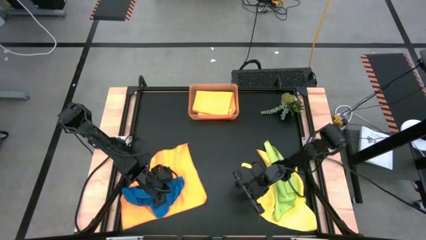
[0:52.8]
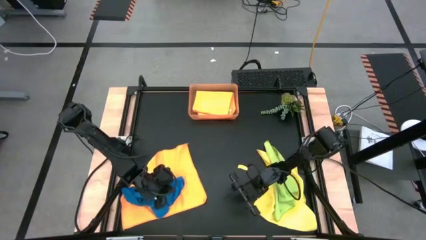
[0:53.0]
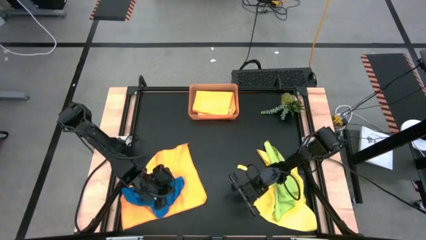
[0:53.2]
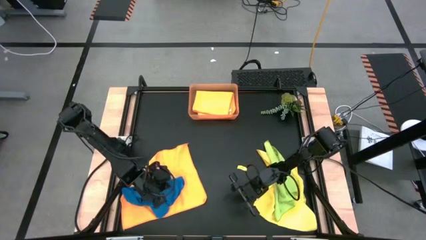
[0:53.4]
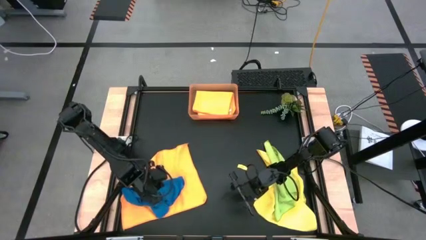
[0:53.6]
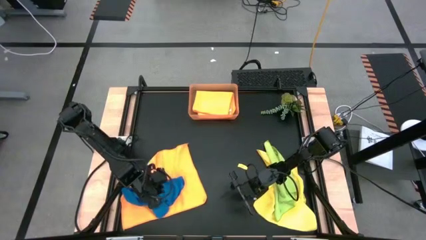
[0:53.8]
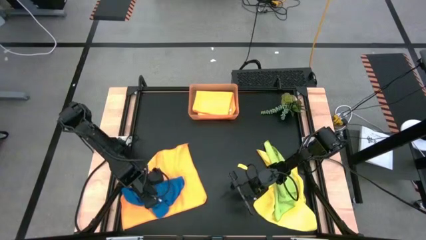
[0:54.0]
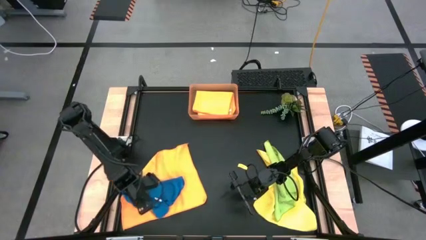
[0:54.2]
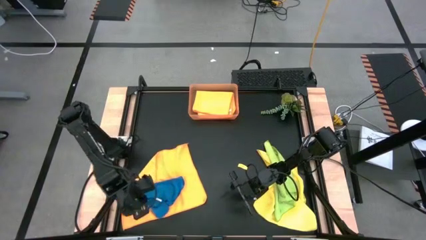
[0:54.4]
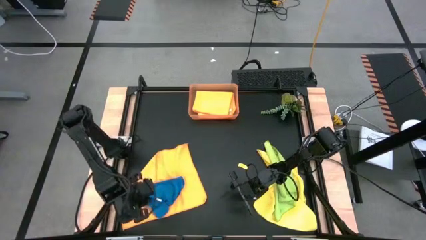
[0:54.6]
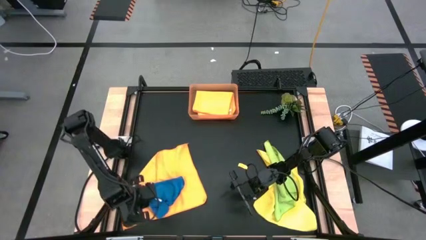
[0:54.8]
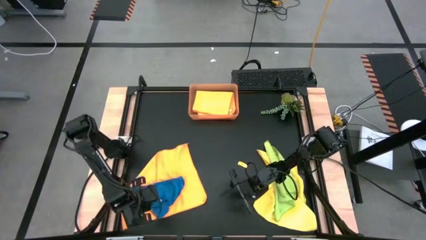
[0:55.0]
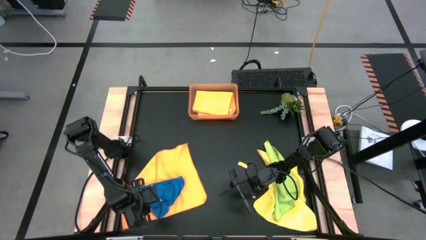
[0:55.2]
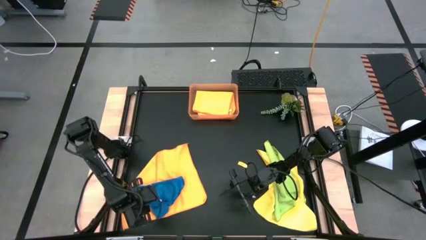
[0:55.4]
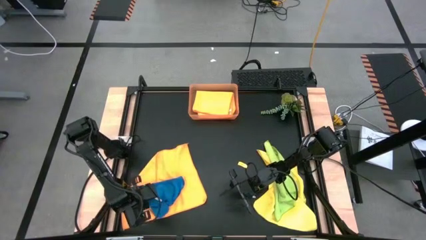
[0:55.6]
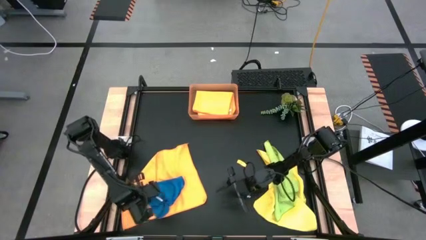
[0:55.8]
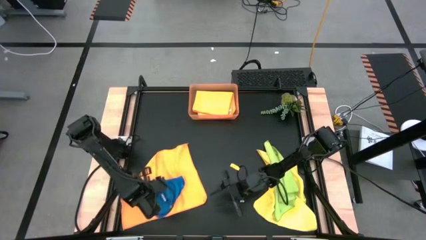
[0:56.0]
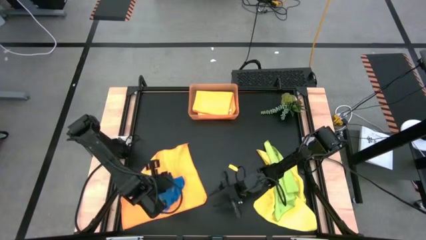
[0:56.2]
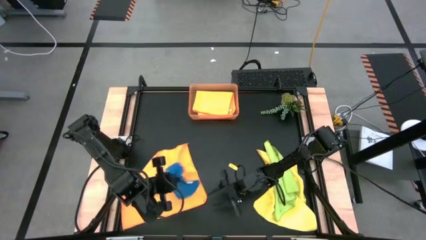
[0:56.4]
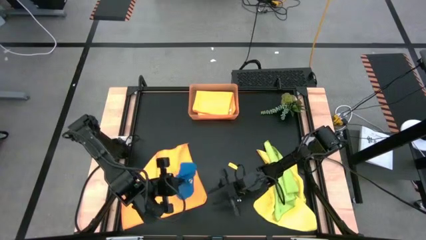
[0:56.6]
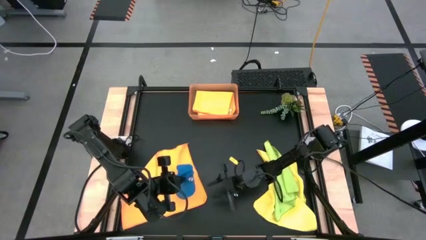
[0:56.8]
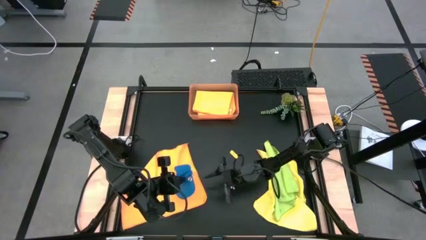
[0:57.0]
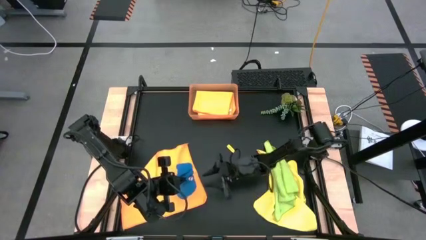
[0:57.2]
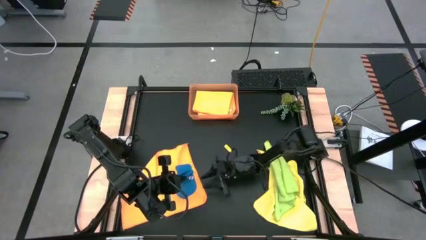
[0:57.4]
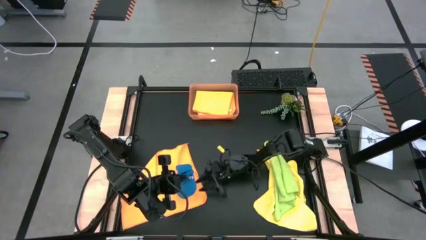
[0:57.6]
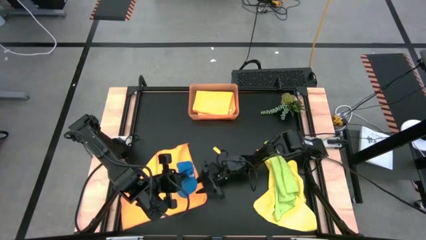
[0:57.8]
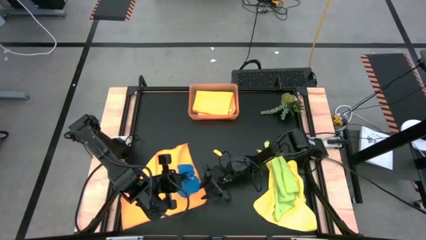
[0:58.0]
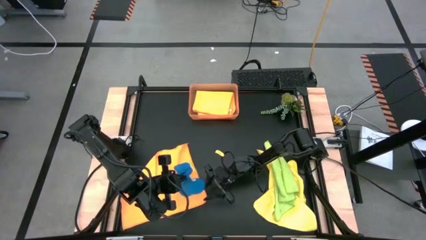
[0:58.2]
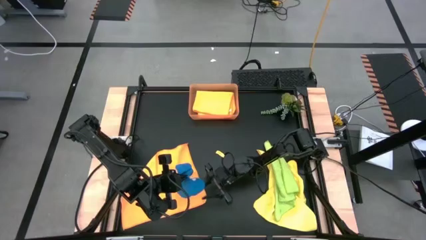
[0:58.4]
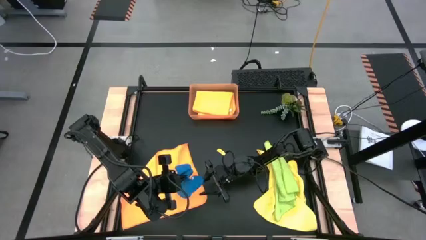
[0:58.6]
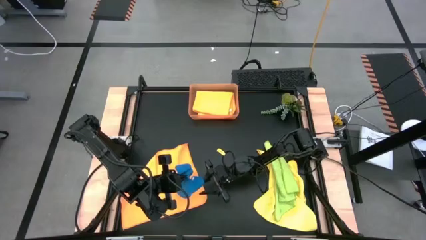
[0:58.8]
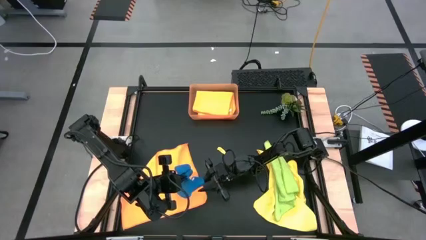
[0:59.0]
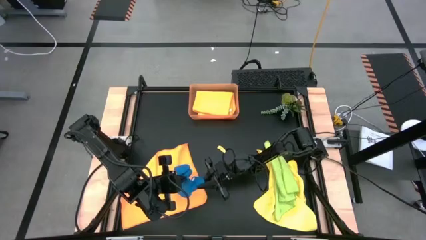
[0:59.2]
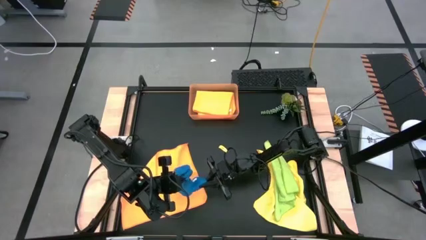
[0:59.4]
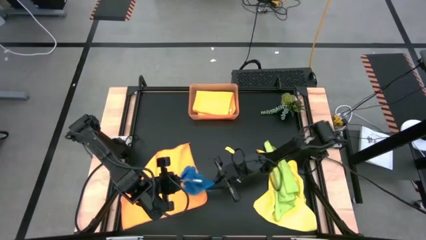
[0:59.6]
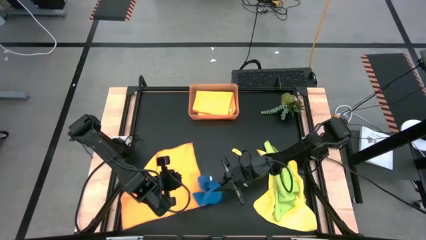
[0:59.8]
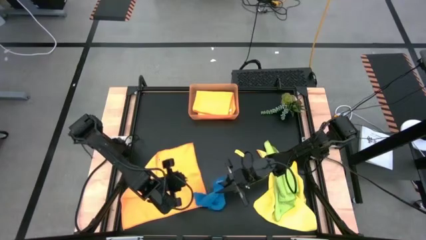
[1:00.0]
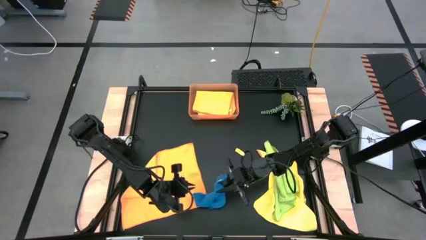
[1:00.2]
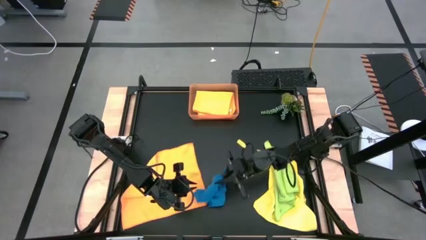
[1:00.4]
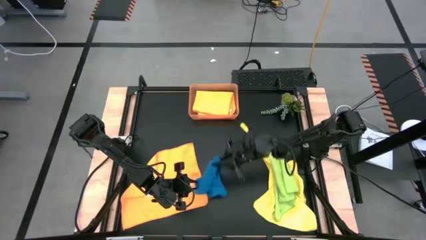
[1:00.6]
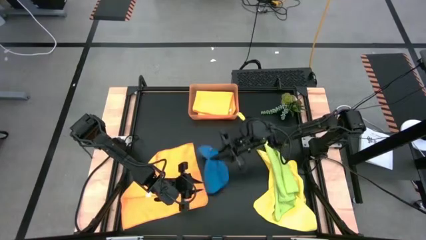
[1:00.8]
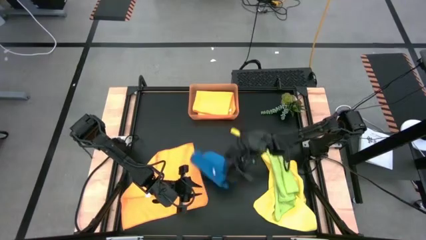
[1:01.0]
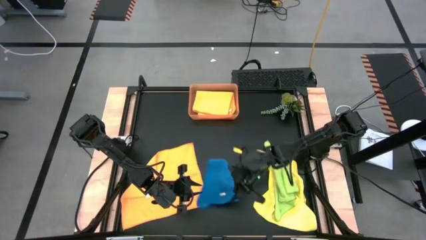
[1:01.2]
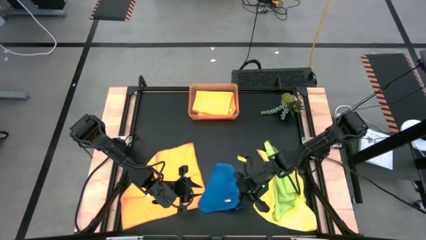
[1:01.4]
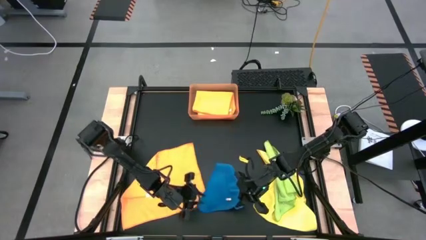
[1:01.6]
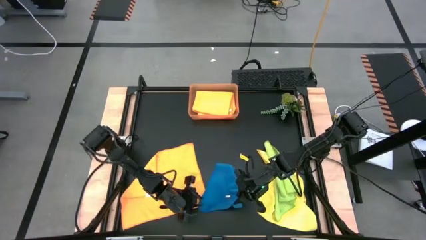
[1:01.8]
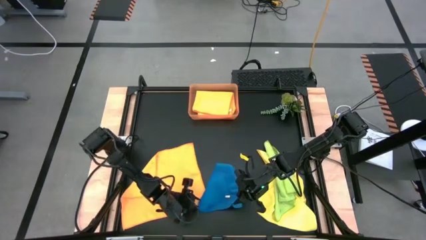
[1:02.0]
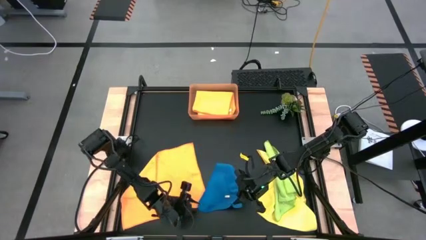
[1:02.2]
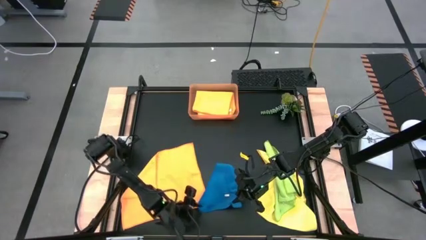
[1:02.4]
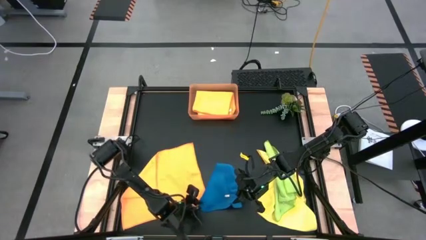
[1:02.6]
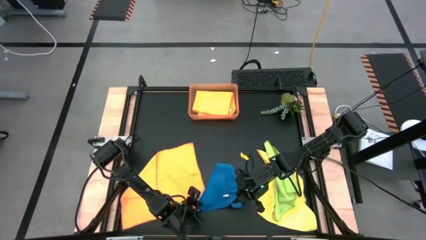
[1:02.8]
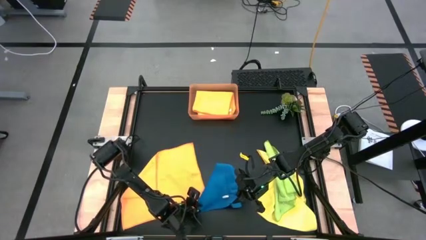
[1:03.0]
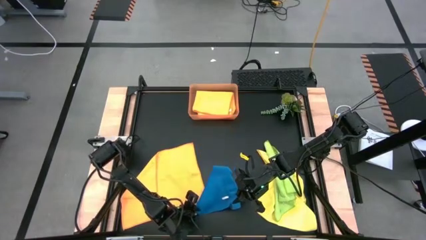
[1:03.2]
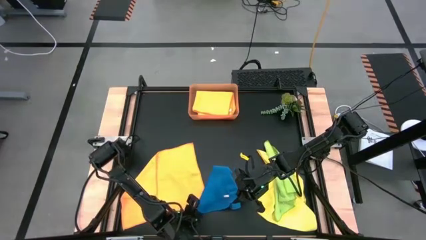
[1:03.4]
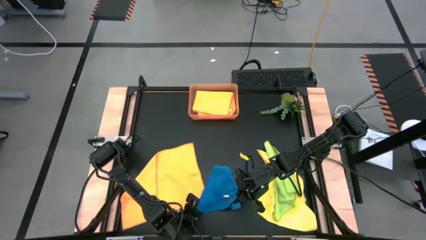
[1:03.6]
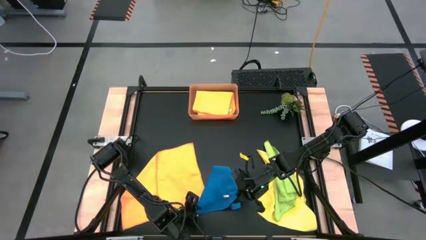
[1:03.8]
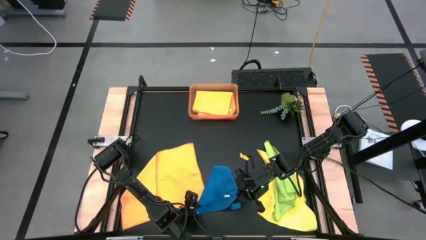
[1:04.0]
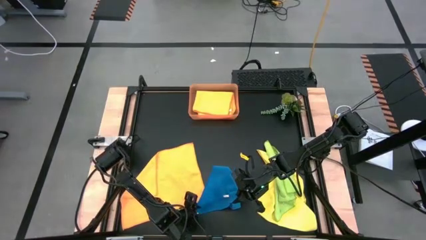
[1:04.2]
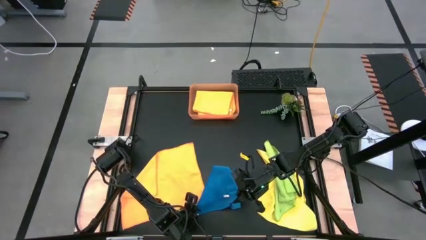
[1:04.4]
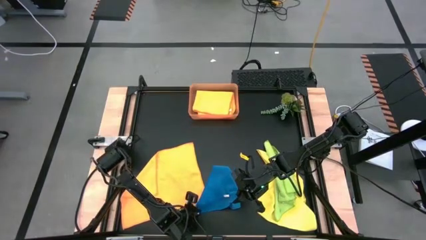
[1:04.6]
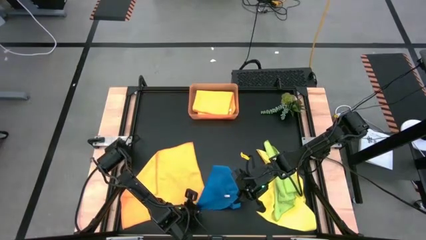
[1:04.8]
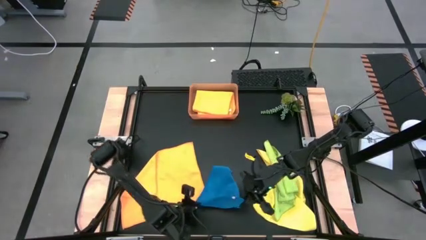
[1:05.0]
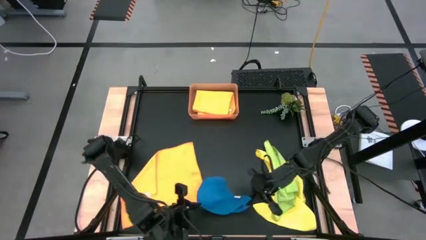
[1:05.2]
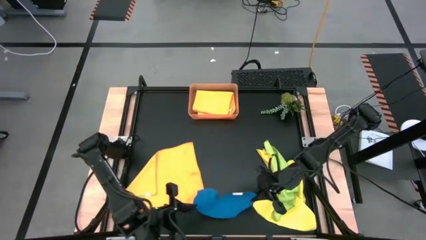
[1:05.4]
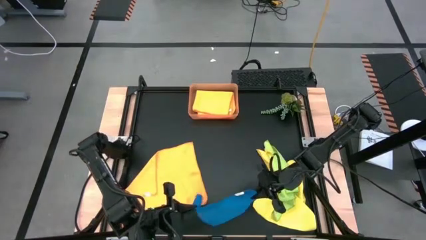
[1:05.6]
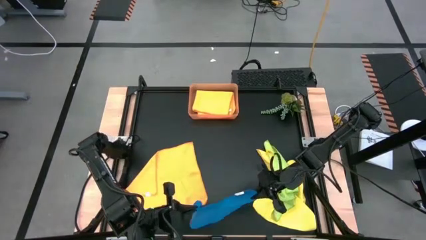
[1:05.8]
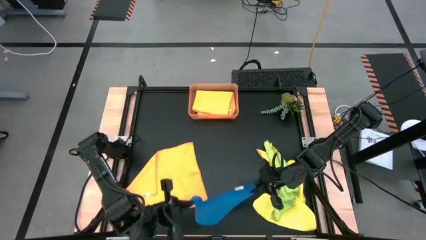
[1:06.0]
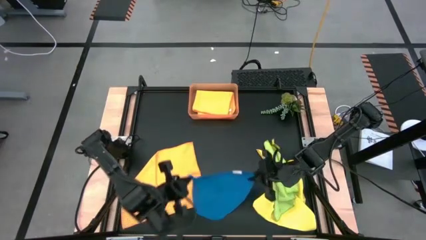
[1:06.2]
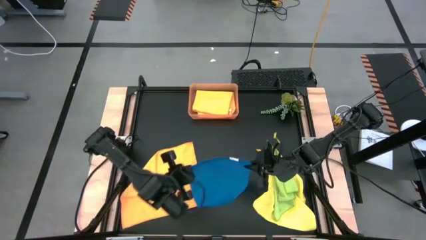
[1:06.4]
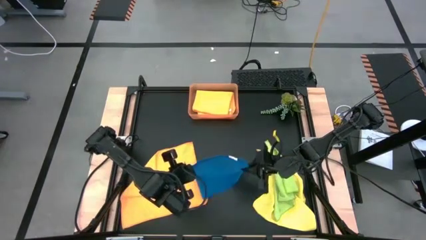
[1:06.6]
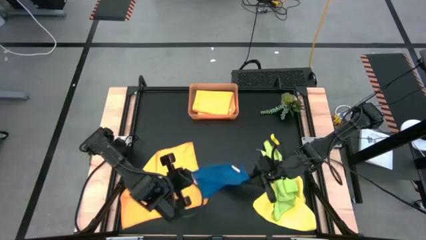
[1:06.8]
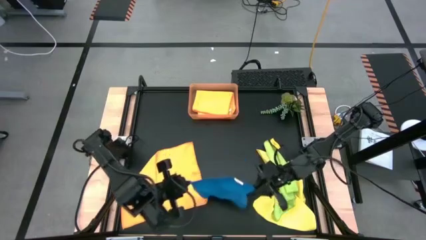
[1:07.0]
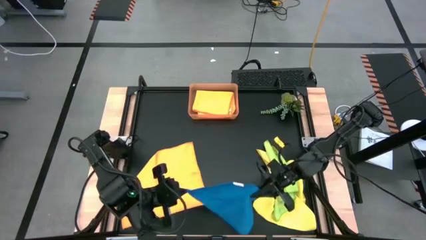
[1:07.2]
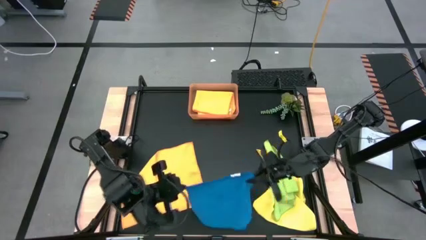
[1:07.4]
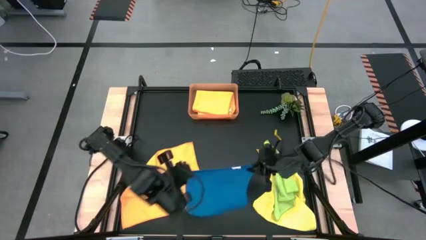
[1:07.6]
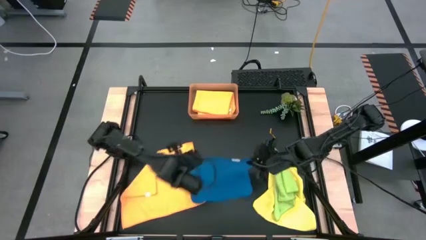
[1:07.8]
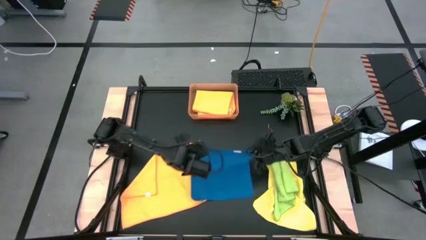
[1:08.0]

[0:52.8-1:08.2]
Task: Fold microfiber towels
Fold the blue towel
